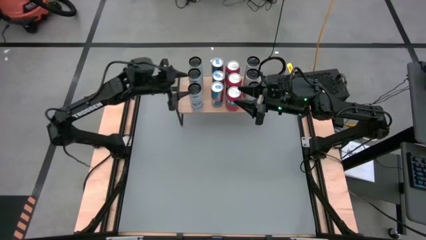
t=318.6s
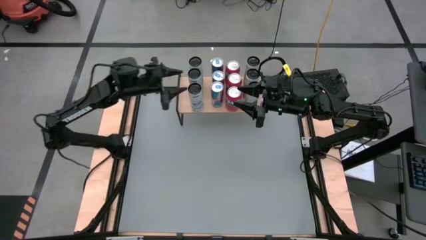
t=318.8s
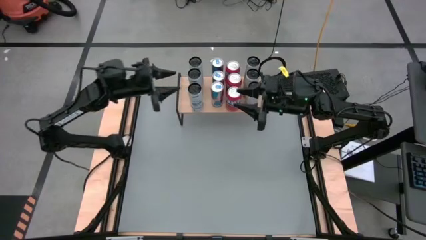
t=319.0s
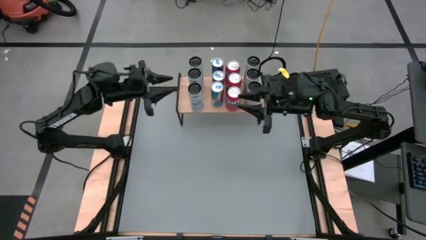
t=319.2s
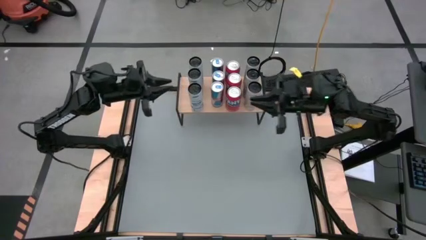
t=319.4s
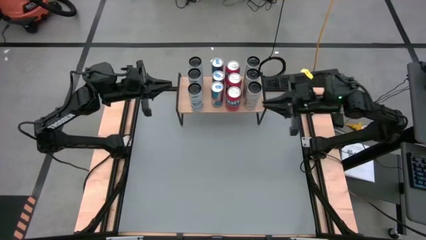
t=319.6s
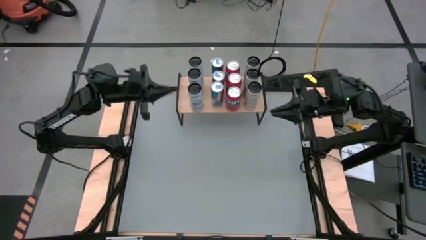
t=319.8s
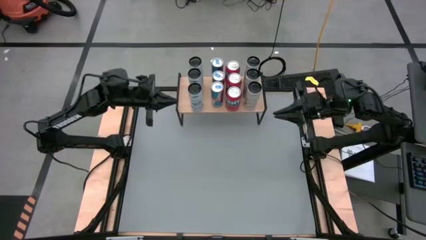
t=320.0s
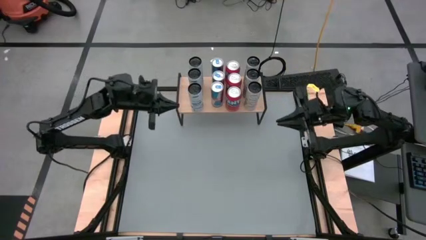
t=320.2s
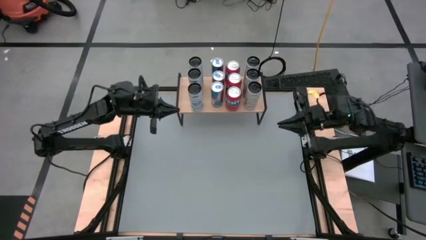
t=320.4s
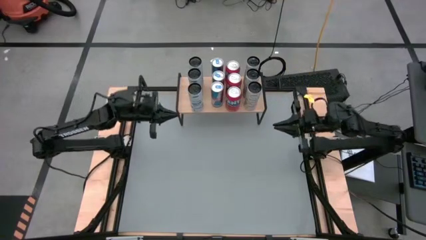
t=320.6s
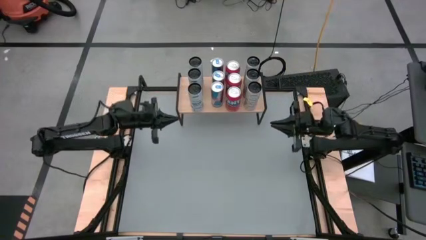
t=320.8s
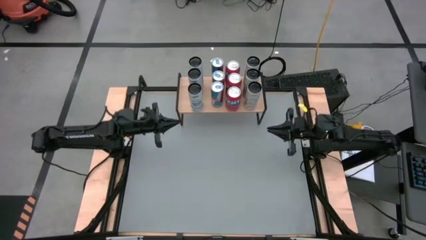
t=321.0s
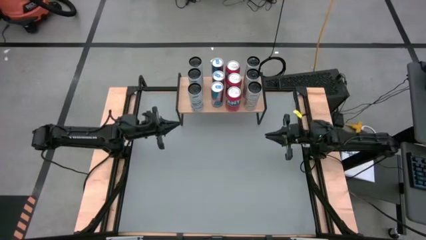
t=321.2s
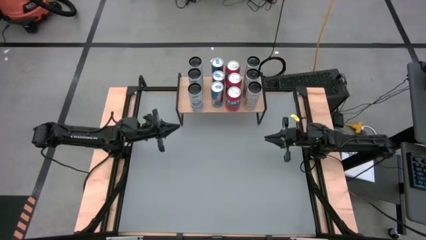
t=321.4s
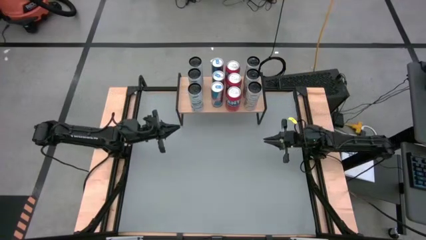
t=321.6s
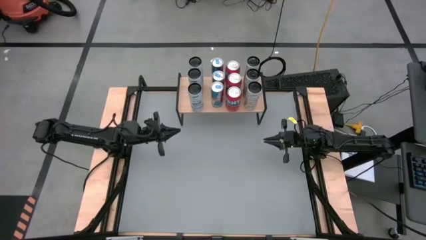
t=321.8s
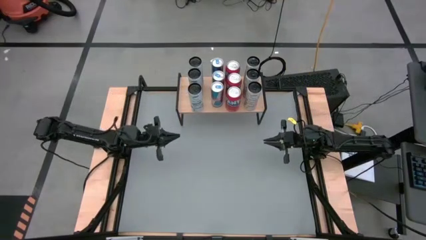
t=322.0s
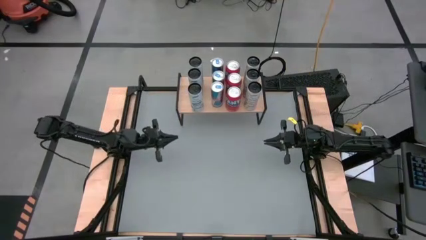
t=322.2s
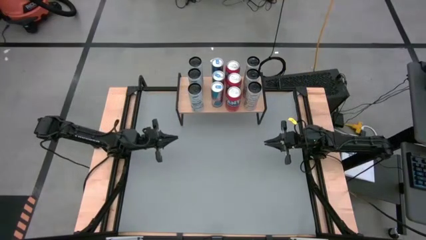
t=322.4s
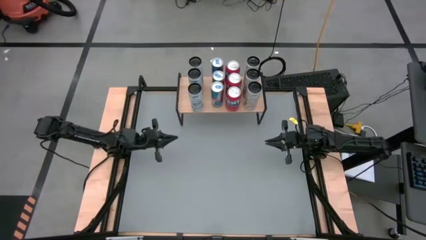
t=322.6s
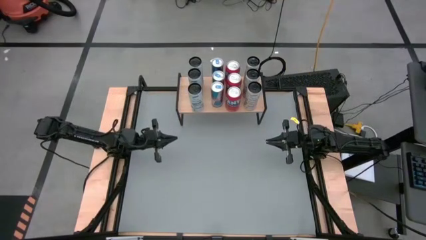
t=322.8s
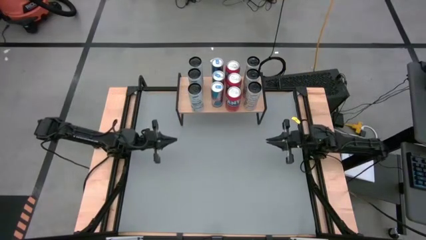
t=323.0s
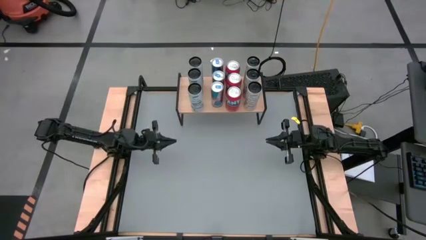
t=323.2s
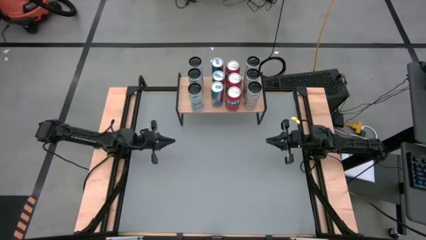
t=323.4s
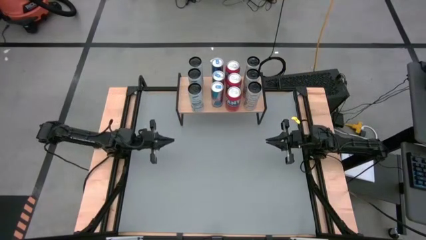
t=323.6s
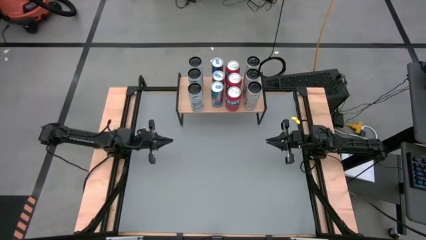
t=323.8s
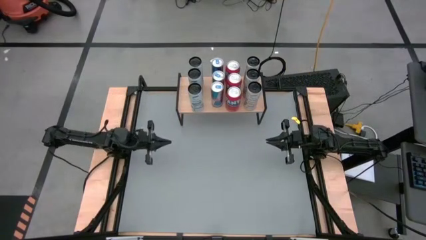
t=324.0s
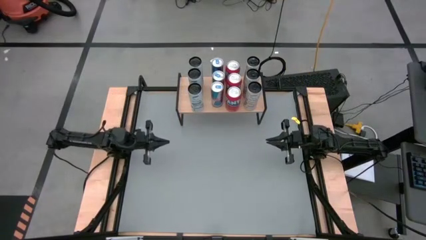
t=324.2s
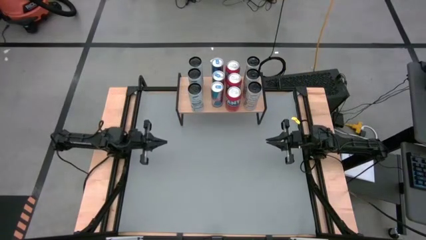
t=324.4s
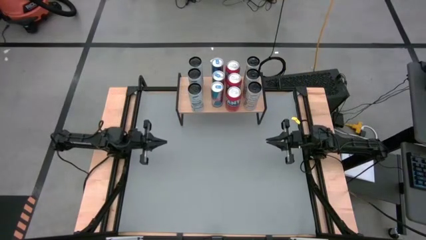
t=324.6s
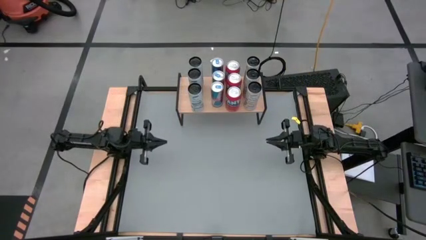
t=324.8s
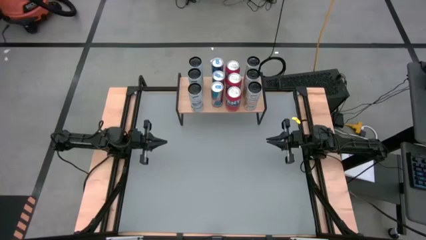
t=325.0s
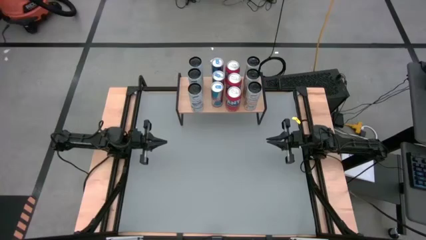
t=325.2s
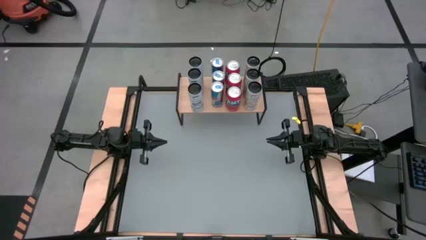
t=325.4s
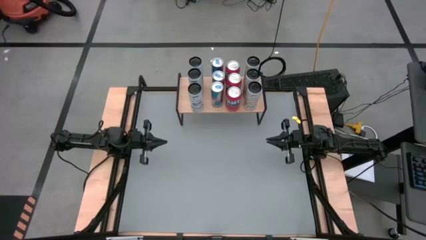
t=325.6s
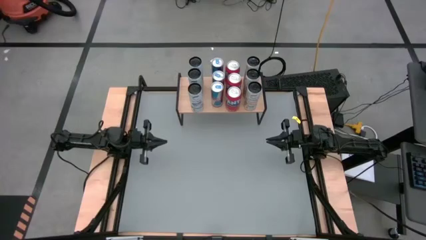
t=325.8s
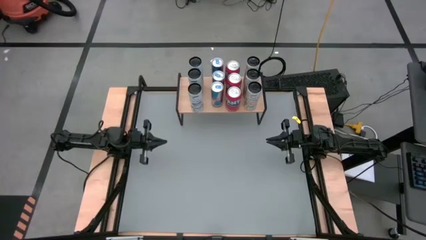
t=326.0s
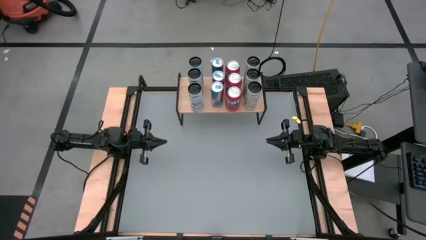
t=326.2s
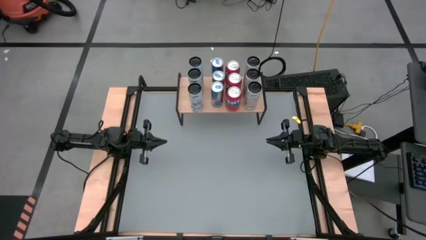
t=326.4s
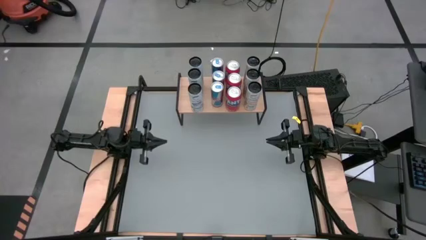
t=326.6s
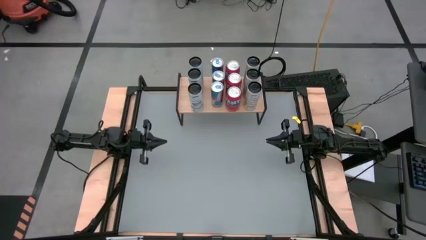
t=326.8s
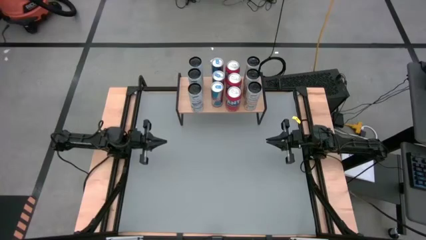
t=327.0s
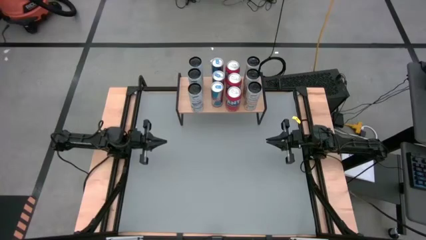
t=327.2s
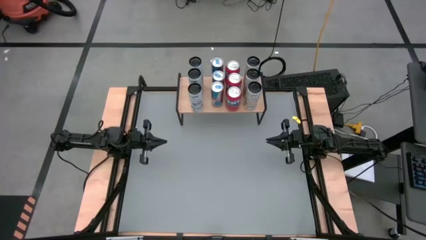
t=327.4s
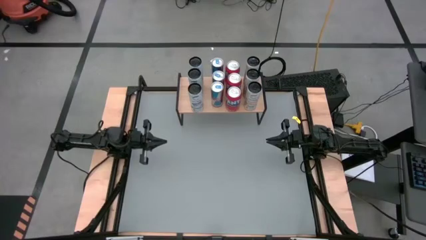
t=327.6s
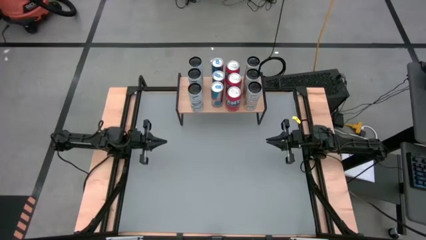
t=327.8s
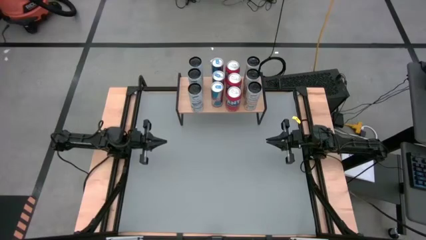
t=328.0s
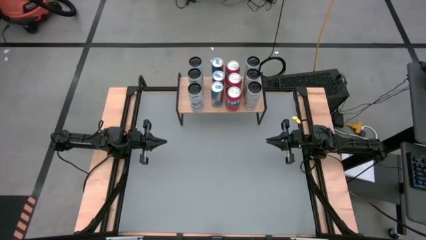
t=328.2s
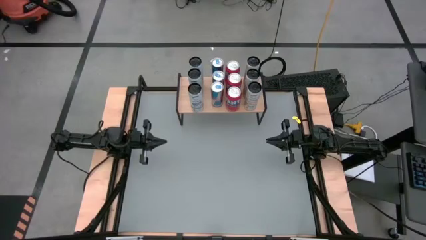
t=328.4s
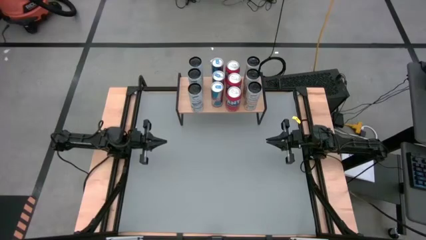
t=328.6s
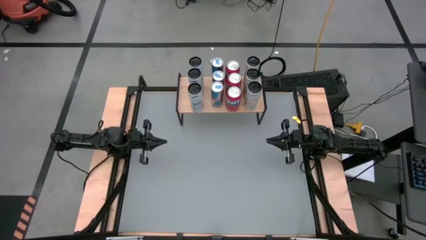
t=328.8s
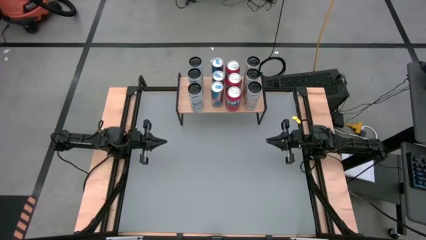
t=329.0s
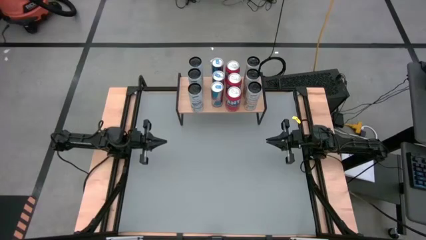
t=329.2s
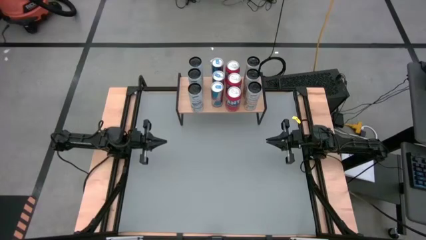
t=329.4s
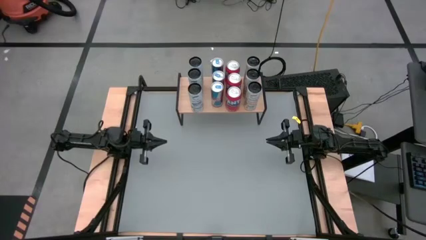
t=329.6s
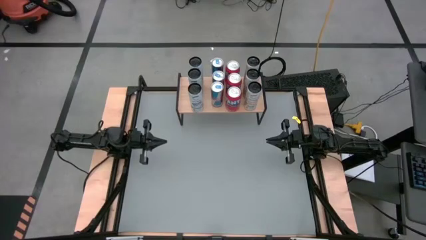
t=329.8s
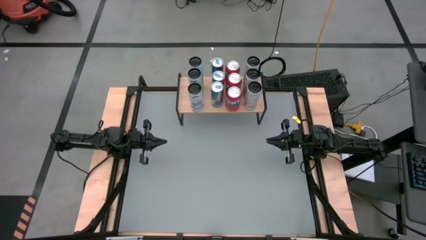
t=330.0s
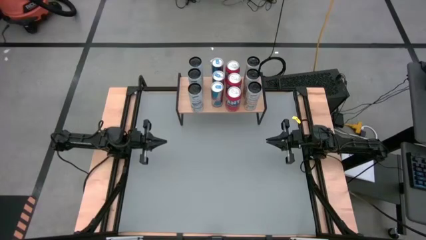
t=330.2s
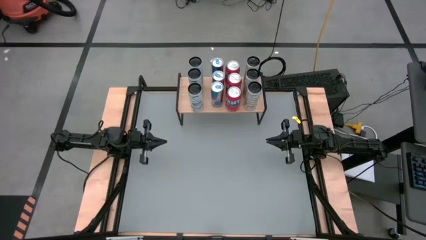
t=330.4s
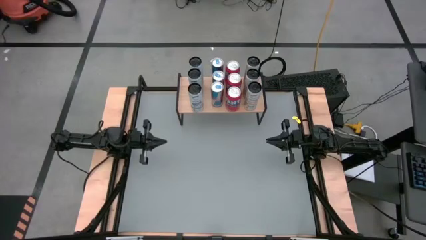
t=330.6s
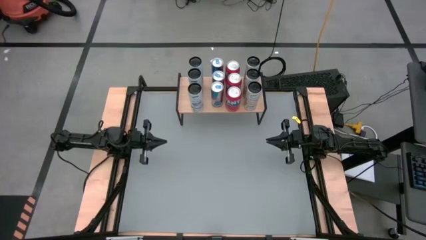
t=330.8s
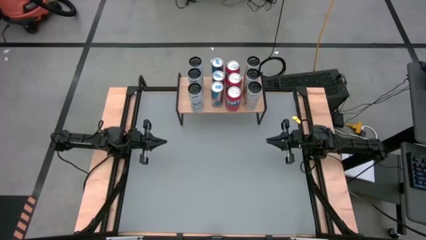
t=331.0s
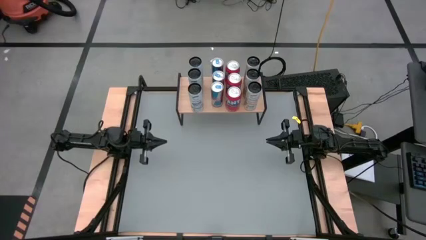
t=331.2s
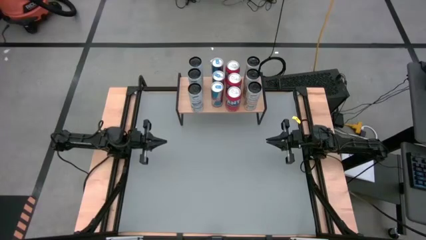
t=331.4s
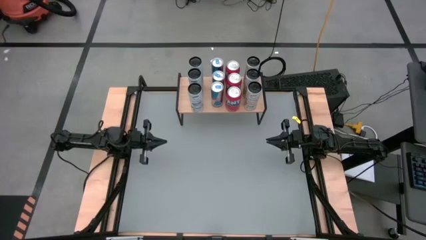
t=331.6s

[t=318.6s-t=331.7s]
Task: Place canned beverage on shelf
Return to Home Position

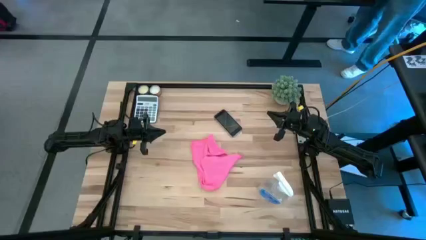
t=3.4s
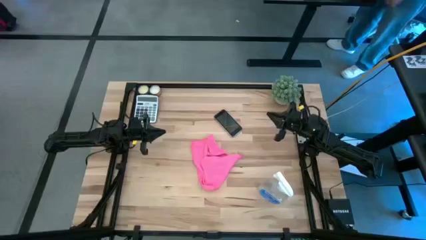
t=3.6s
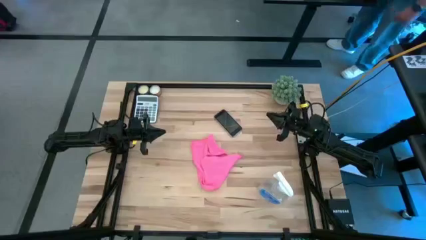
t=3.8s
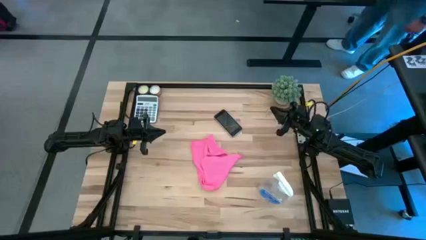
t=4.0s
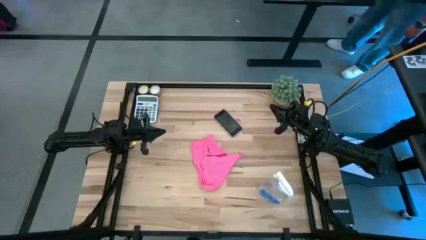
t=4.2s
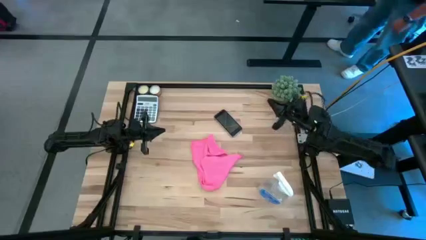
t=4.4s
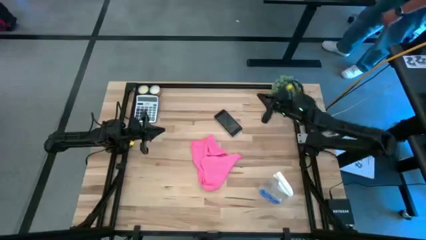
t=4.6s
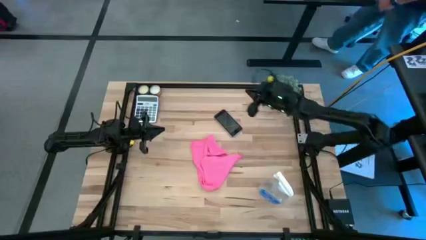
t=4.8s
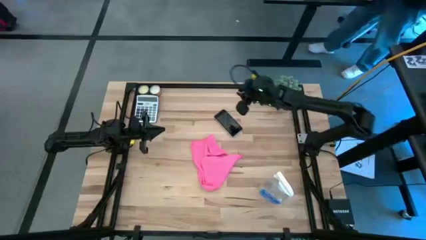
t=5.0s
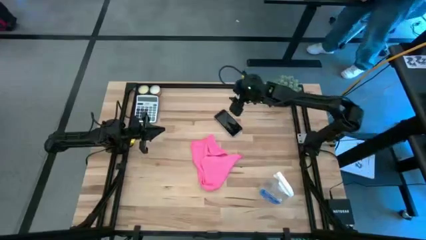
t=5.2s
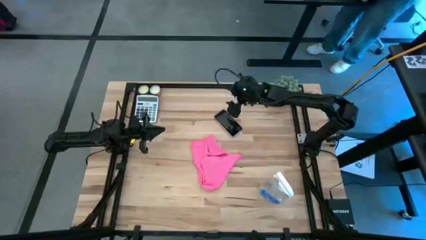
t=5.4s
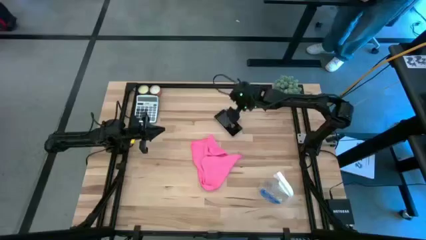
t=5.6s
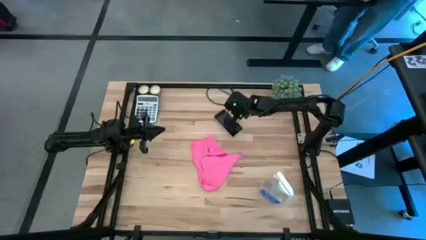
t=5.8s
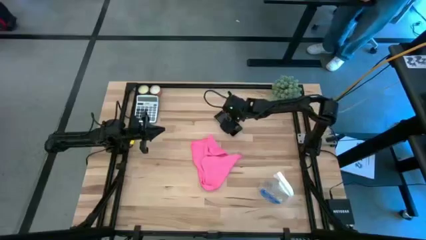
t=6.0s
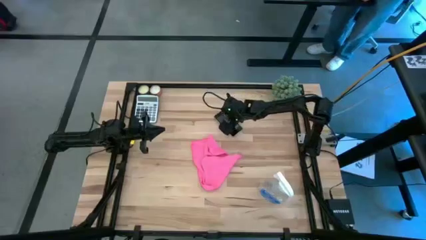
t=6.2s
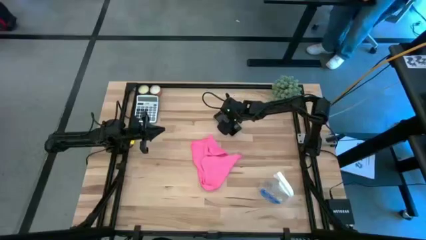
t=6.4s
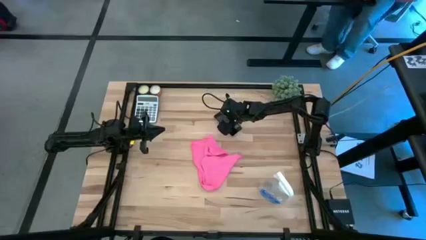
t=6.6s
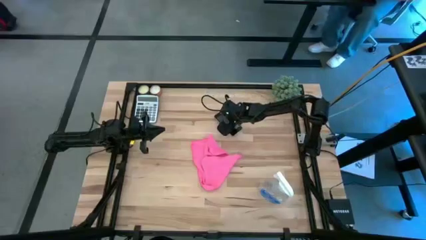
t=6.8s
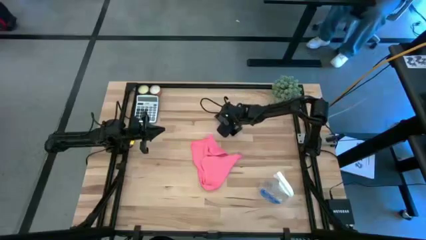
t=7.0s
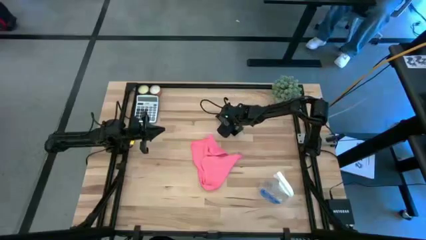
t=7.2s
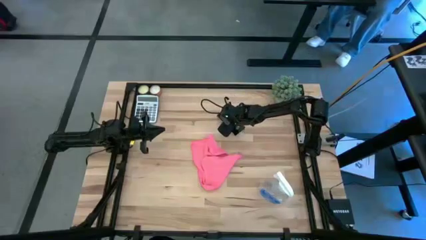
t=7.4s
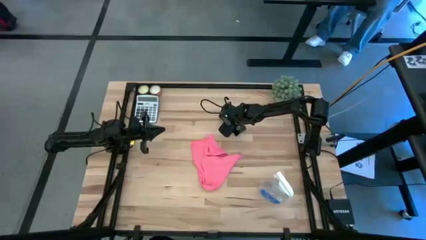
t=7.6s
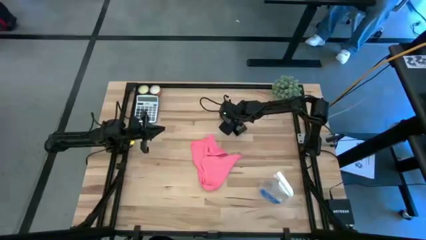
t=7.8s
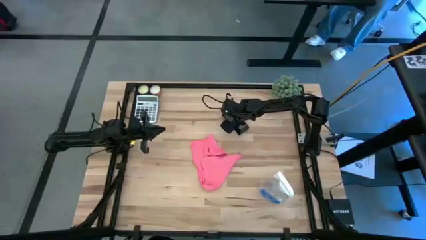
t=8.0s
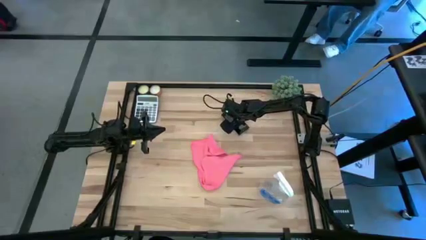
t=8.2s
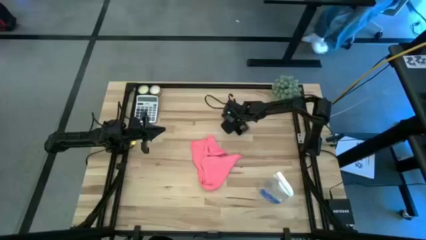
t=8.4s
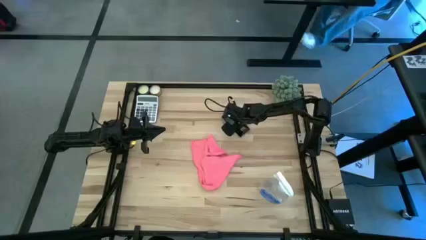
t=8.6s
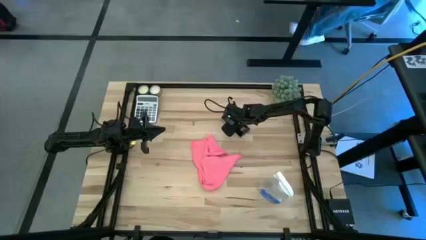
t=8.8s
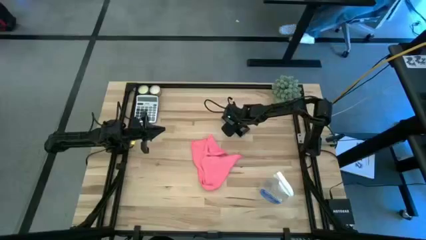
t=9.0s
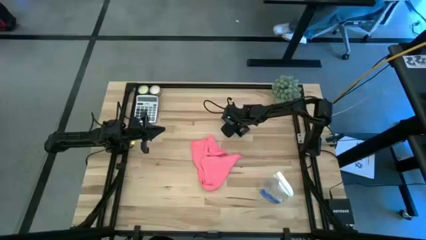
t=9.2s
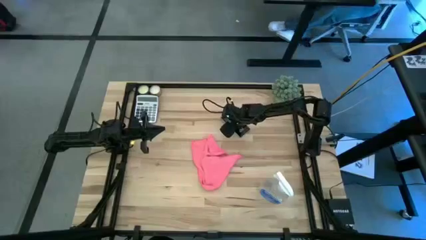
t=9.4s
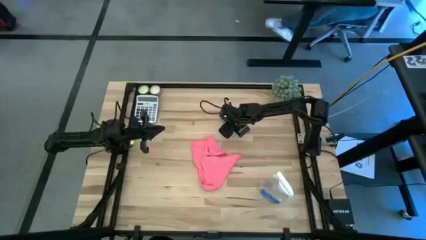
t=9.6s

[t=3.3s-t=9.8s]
Task: Apply microfiber cloth
Spray the black cellphone with the spray bottle
